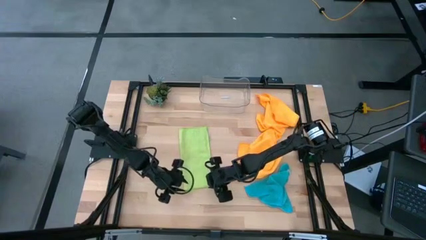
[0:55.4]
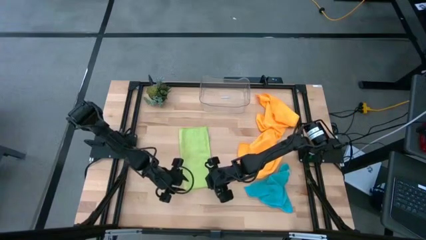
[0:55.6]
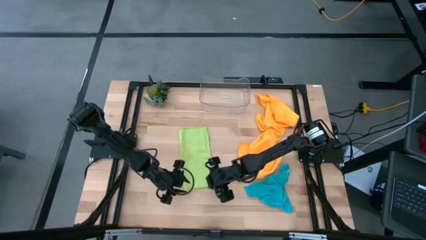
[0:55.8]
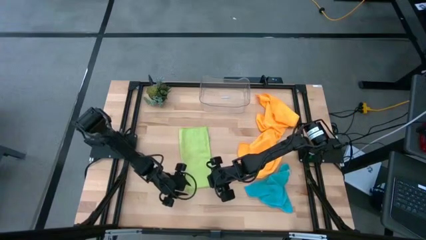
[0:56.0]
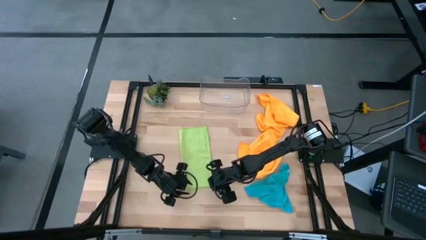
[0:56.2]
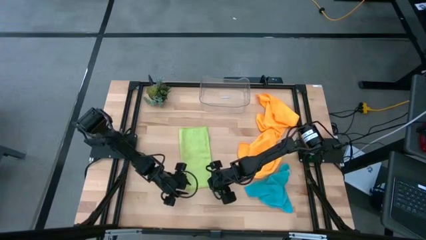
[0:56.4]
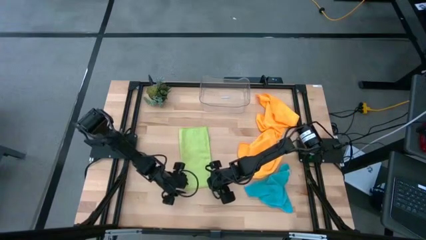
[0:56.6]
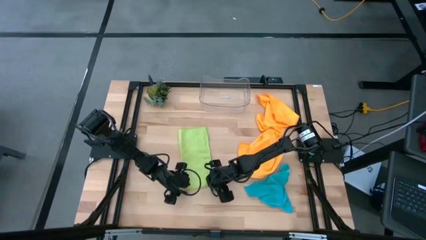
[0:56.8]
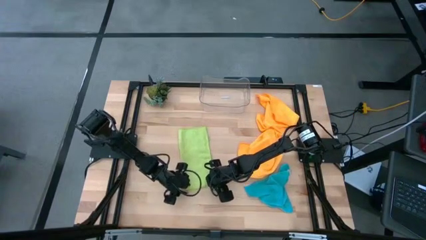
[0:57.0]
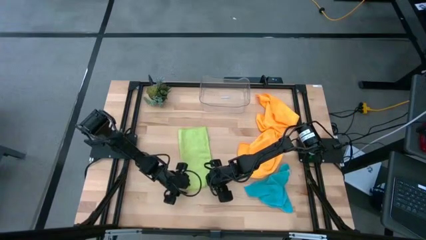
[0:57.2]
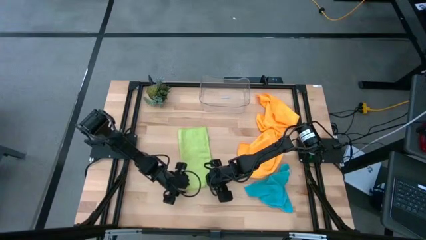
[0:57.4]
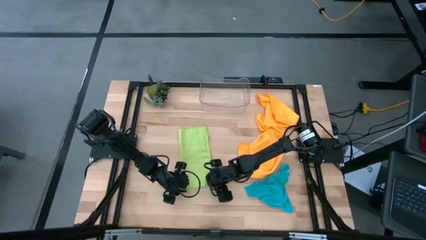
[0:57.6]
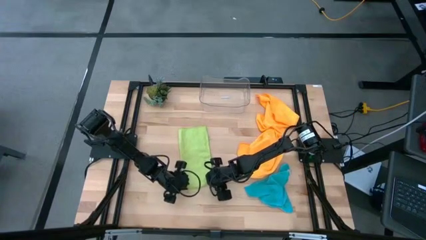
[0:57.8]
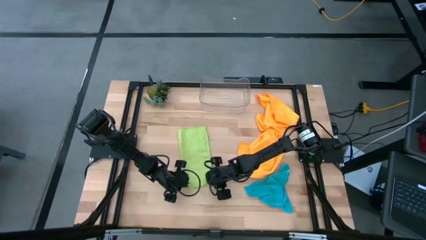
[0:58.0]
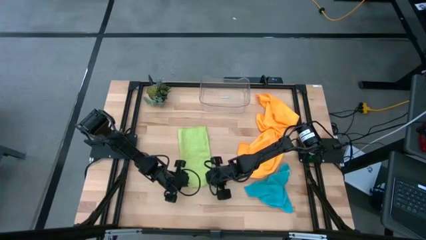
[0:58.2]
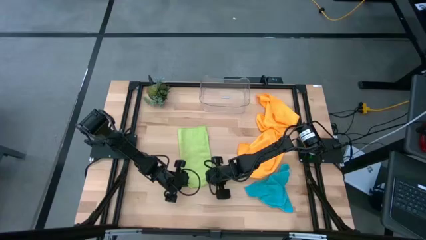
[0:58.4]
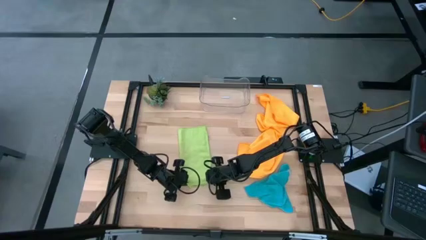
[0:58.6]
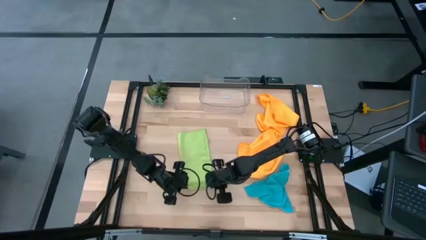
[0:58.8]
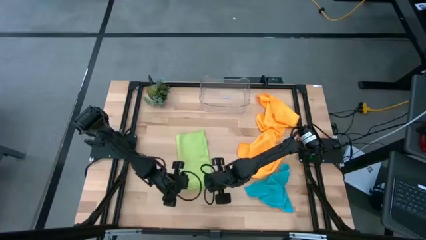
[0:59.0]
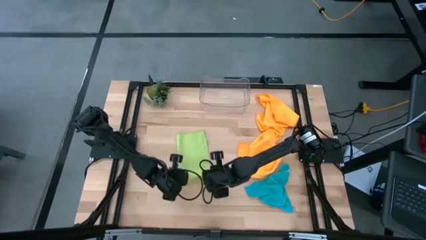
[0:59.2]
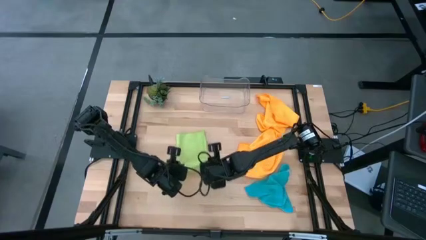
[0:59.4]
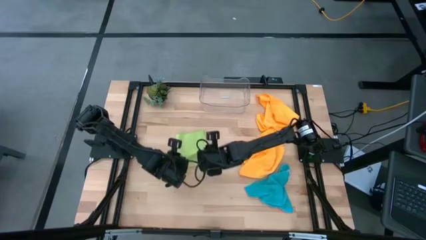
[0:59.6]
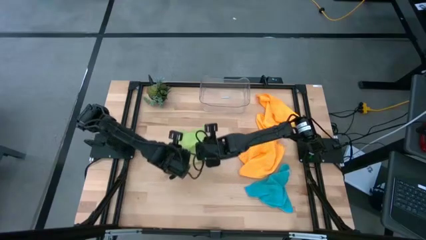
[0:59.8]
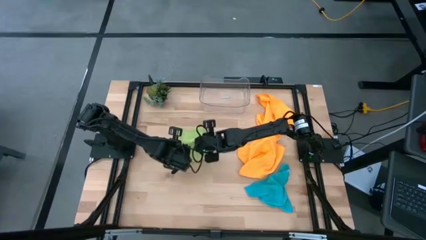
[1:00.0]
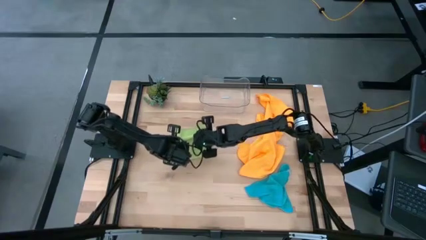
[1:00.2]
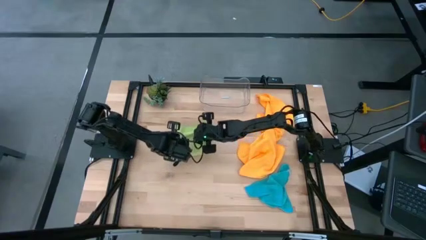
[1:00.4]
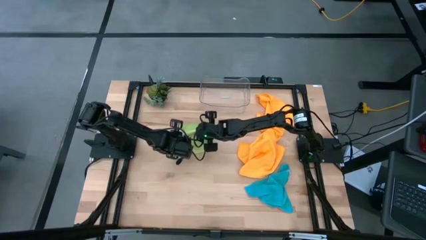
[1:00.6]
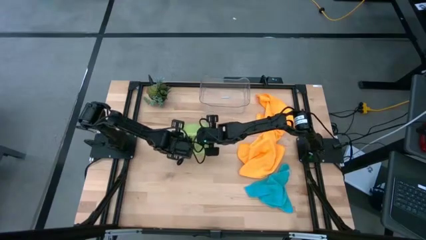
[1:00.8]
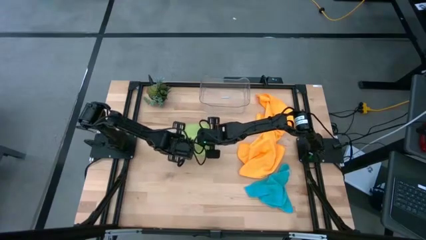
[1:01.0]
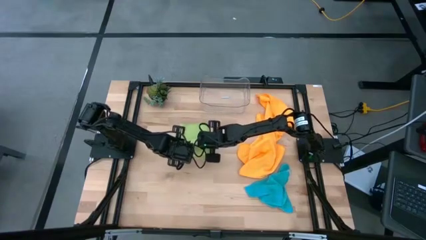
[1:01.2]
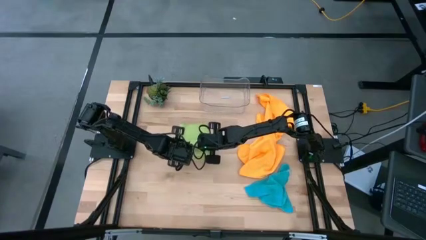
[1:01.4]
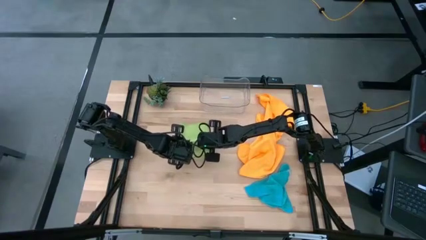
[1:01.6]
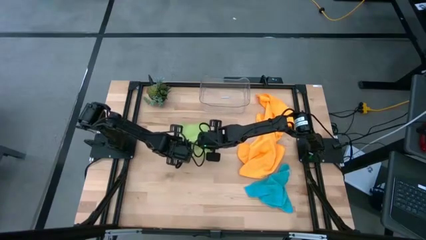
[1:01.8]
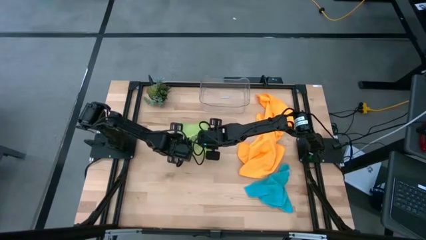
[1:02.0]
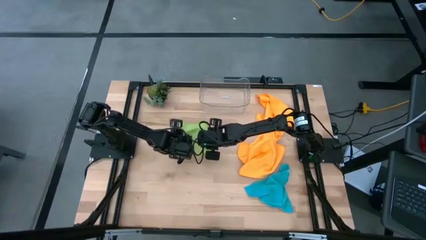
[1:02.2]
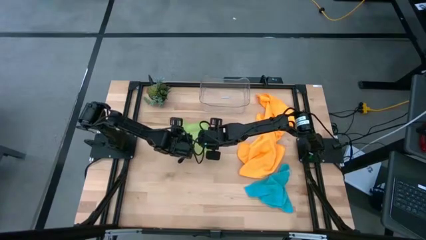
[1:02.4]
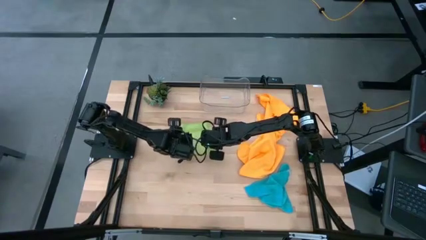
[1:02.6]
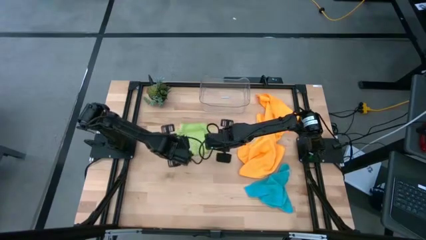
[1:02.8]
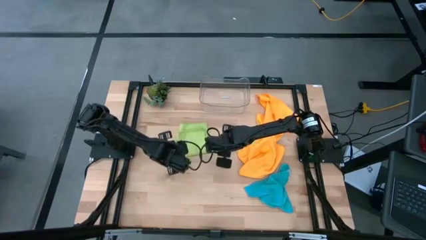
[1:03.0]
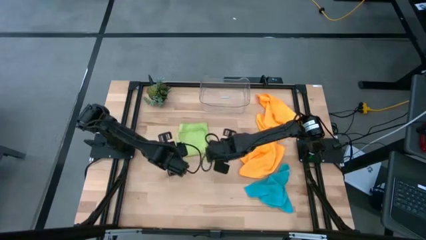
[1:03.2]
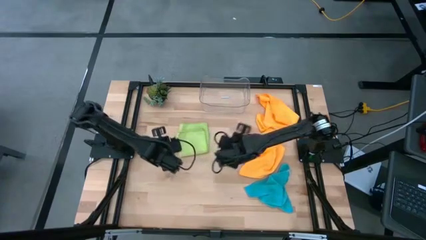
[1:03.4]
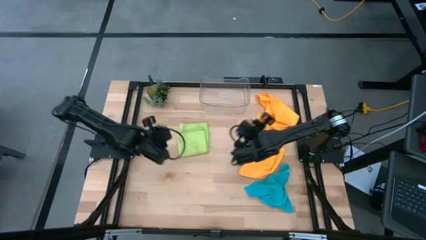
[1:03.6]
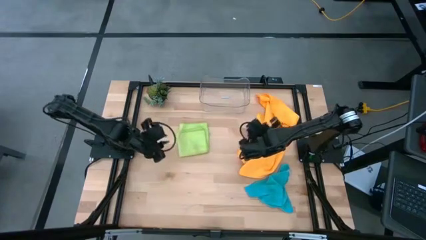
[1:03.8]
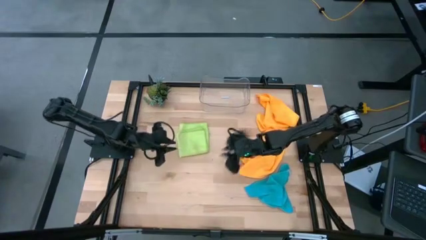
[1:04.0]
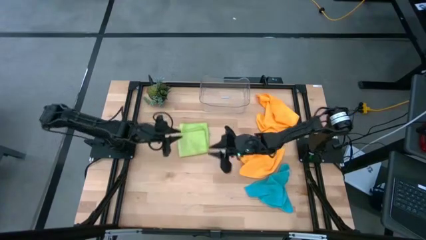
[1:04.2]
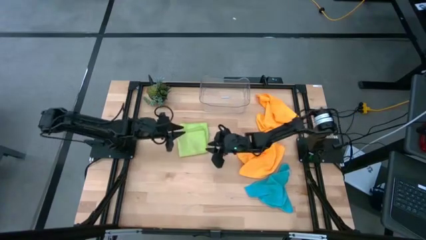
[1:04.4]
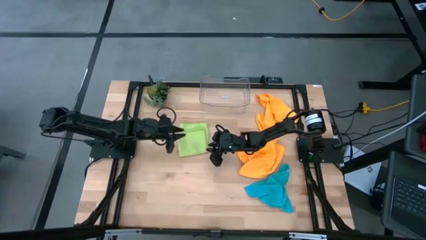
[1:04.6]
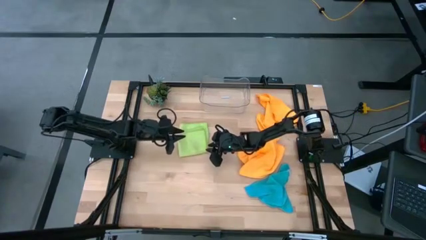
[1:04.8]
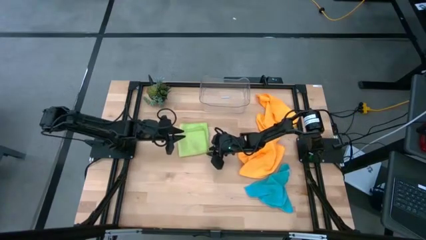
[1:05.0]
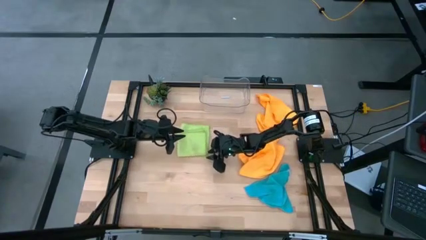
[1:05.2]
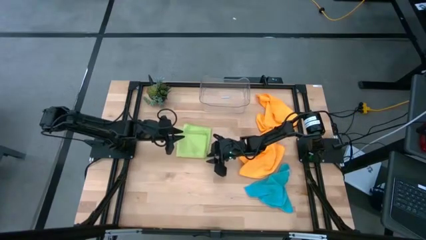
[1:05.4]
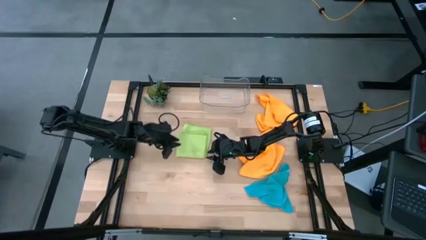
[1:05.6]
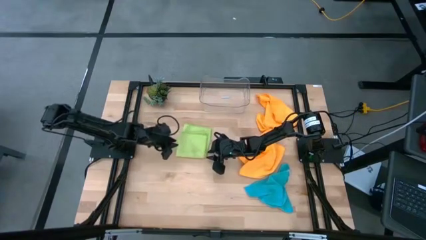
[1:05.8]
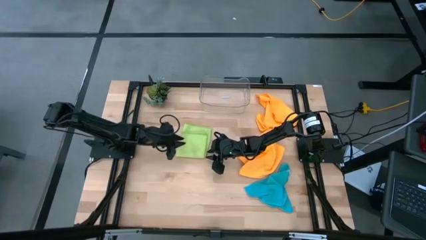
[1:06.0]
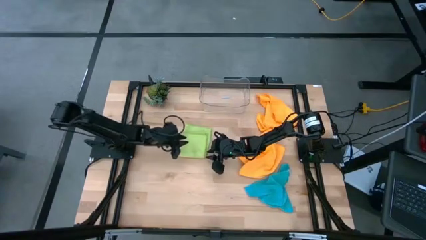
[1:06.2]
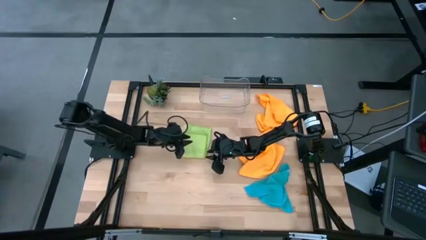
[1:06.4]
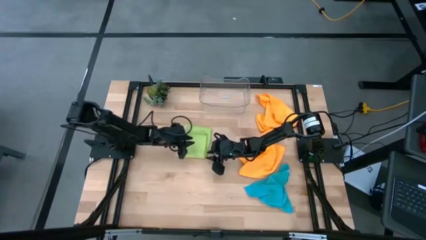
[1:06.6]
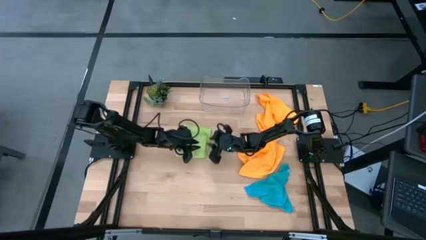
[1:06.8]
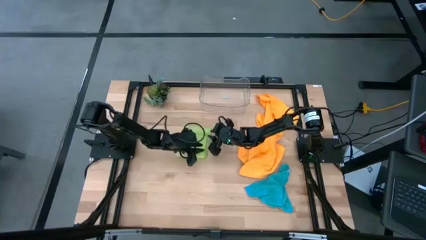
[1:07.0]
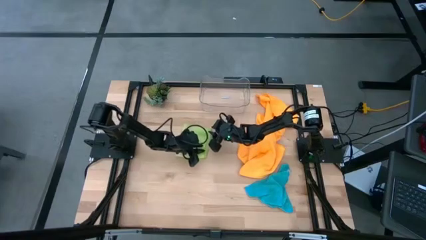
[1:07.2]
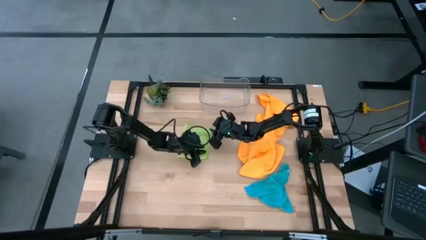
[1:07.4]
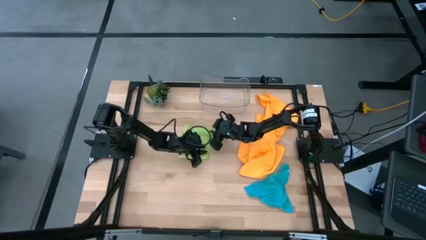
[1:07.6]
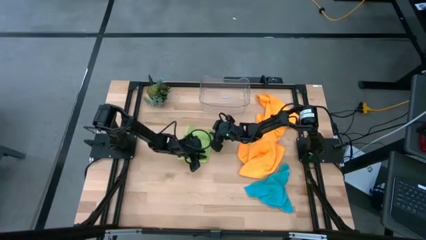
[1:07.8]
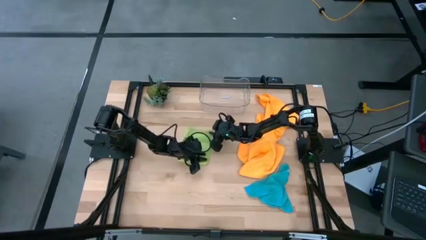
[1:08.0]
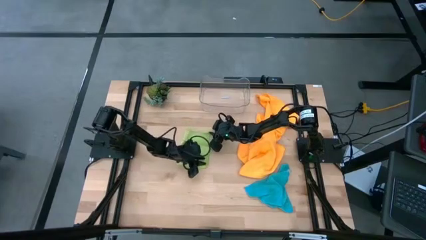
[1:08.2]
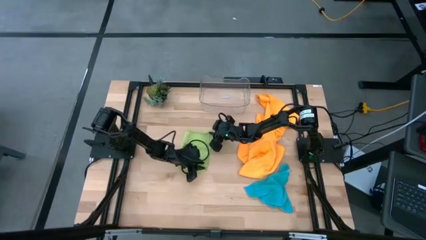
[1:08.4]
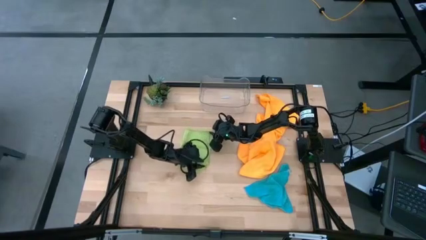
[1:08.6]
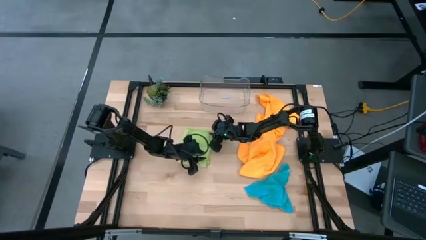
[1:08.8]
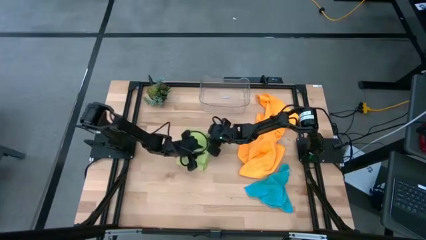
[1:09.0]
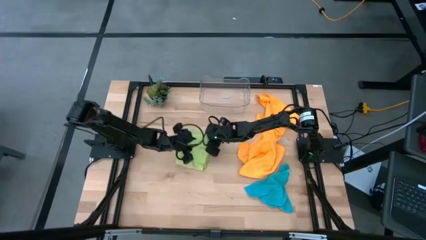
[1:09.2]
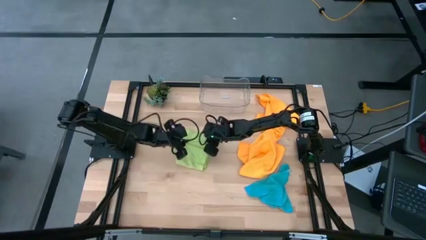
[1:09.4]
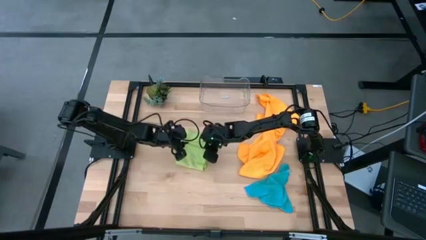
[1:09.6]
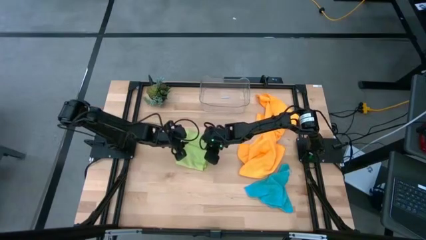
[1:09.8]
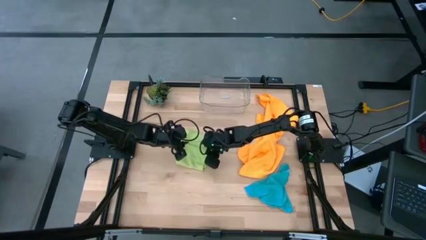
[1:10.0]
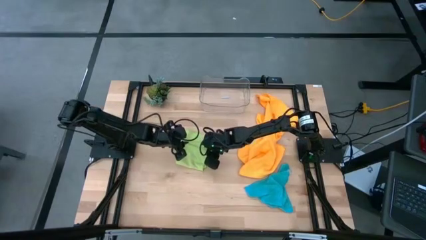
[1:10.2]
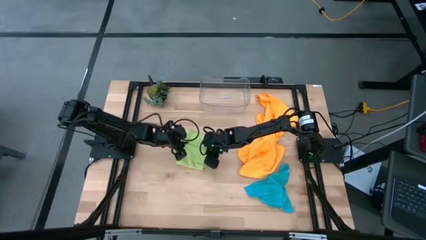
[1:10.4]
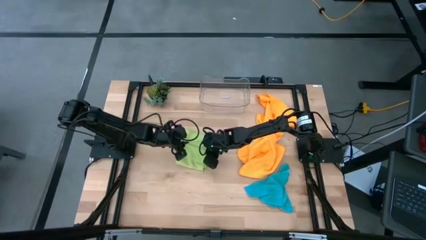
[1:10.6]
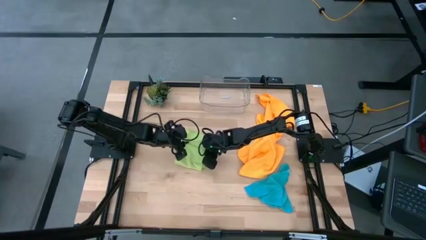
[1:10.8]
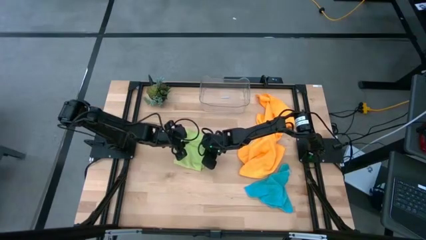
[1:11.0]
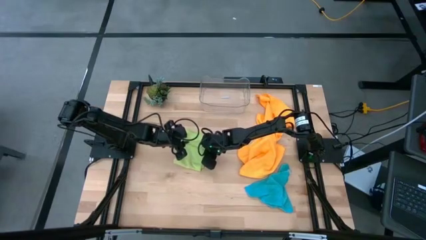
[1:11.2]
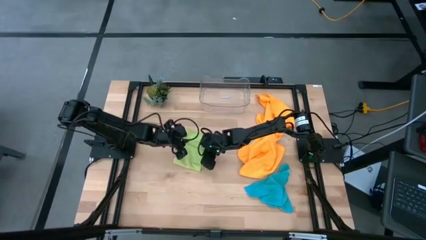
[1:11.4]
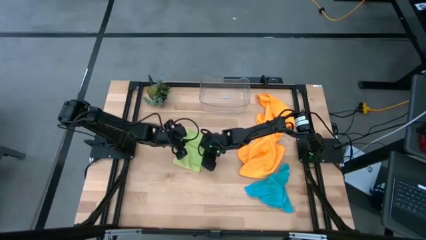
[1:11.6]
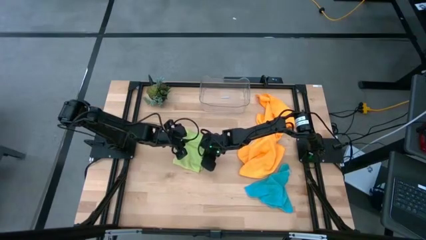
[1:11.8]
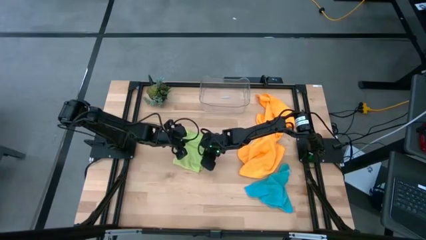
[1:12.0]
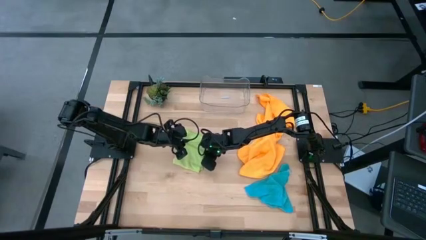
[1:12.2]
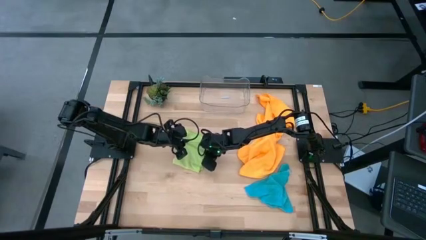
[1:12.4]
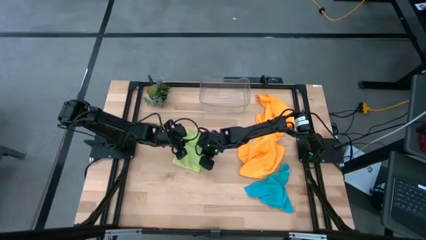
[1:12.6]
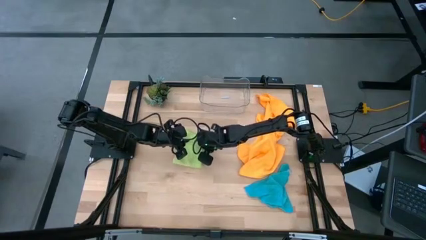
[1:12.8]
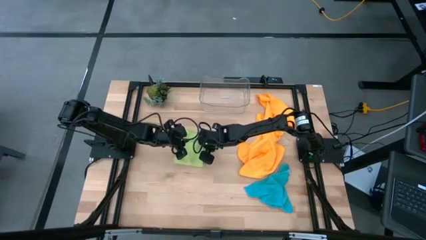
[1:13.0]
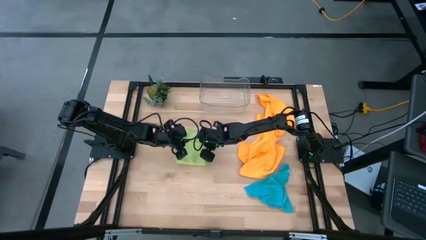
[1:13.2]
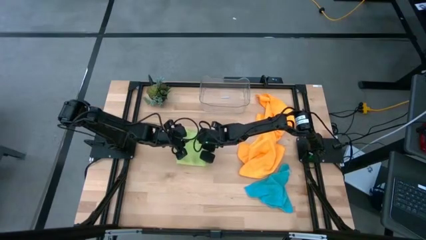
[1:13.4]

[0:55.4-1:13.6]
Task: Fold microfiber towels
Fold the green microfiber cloth
